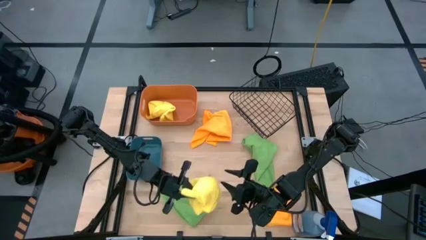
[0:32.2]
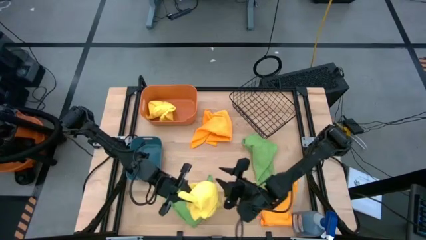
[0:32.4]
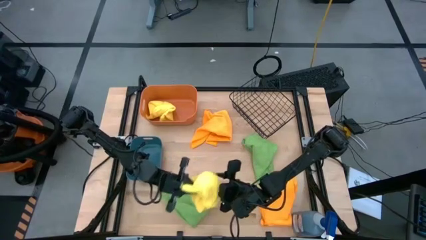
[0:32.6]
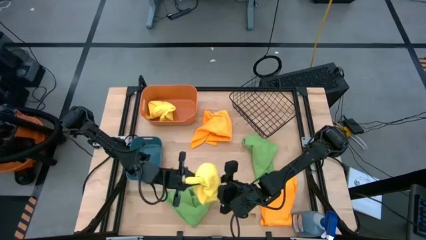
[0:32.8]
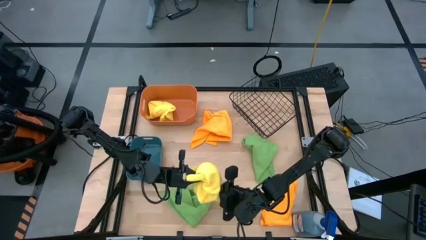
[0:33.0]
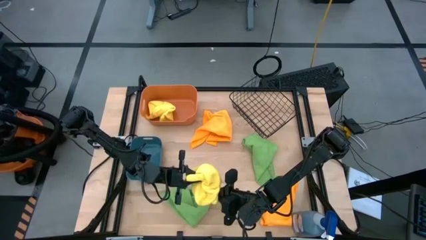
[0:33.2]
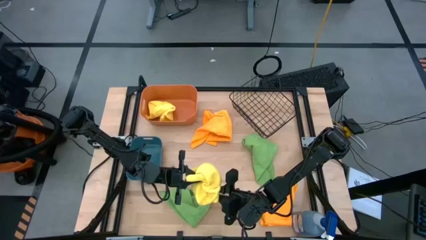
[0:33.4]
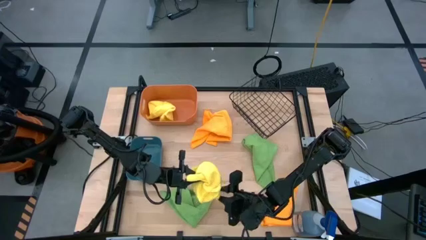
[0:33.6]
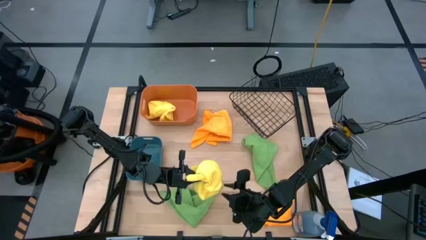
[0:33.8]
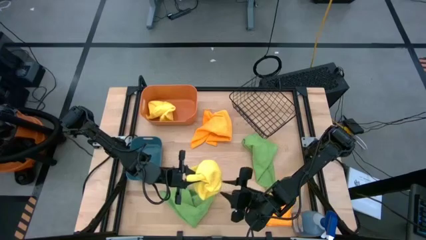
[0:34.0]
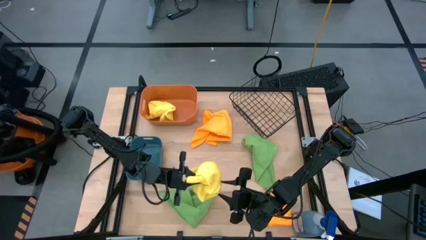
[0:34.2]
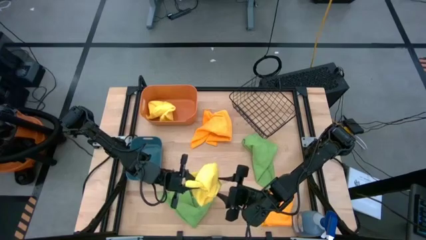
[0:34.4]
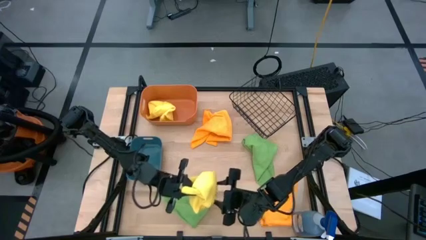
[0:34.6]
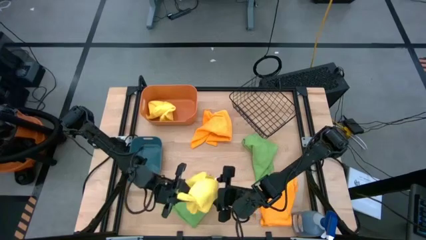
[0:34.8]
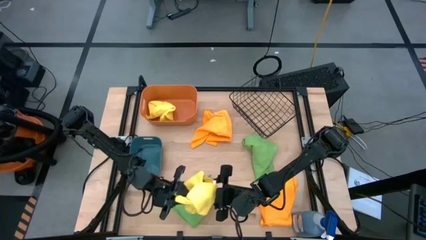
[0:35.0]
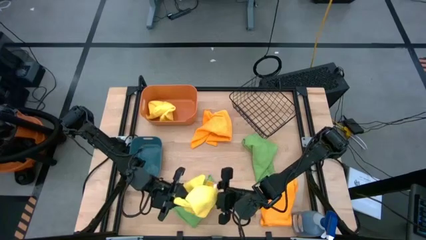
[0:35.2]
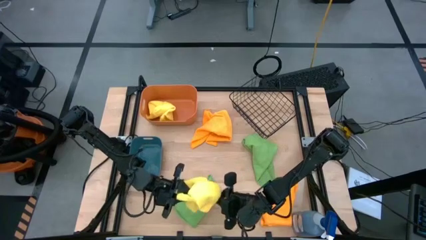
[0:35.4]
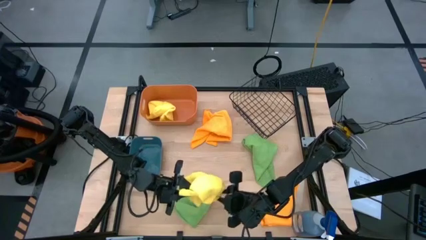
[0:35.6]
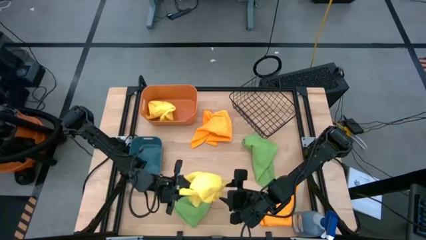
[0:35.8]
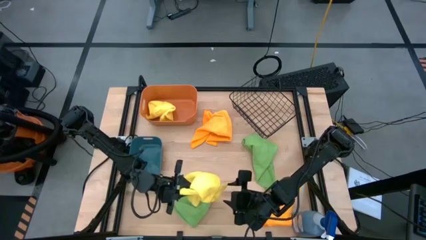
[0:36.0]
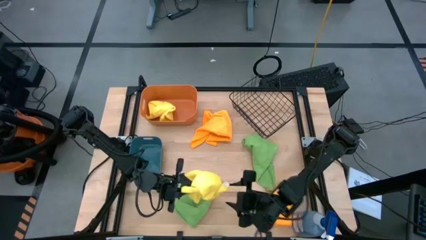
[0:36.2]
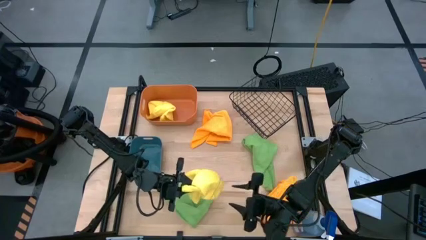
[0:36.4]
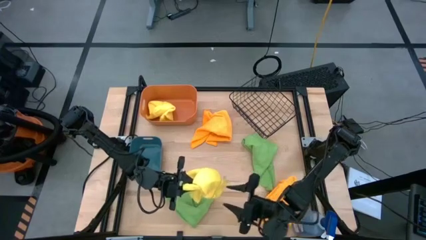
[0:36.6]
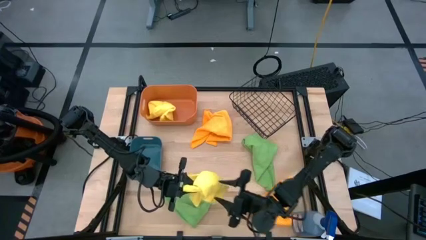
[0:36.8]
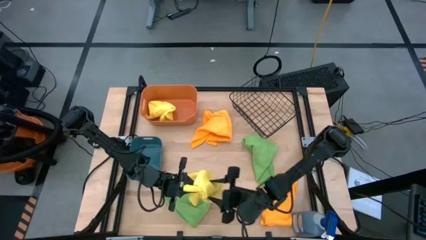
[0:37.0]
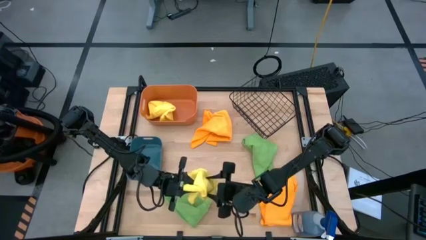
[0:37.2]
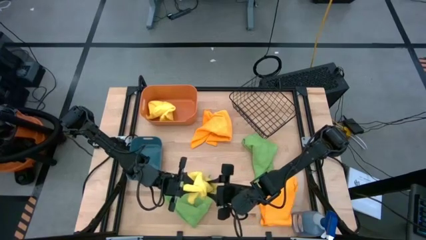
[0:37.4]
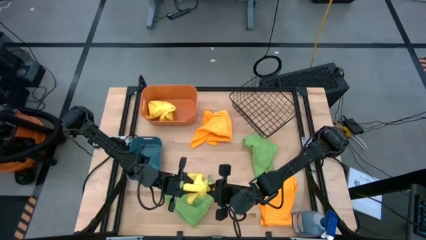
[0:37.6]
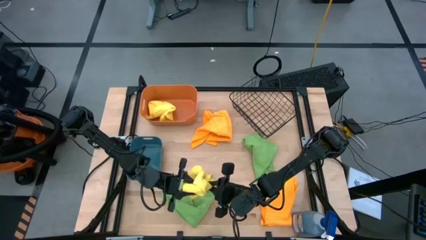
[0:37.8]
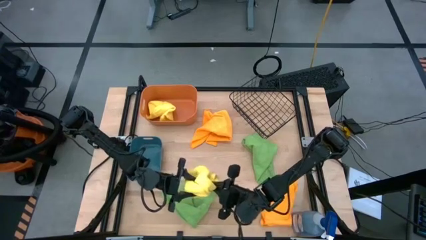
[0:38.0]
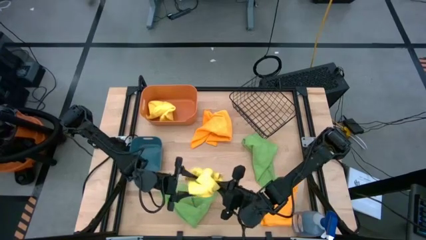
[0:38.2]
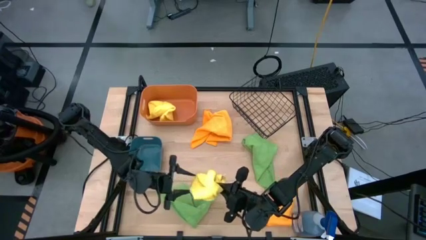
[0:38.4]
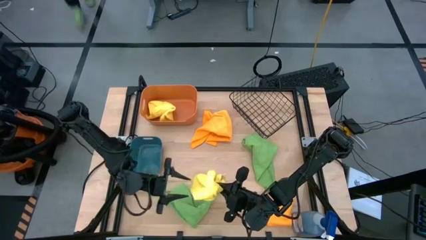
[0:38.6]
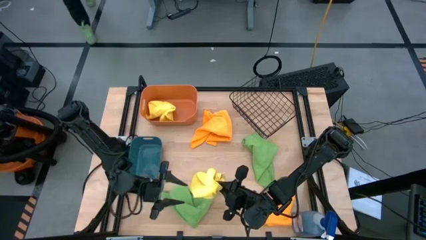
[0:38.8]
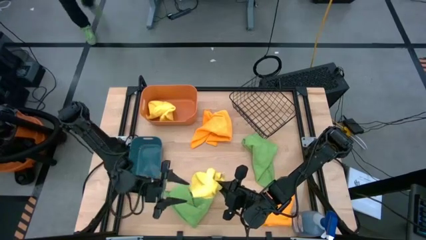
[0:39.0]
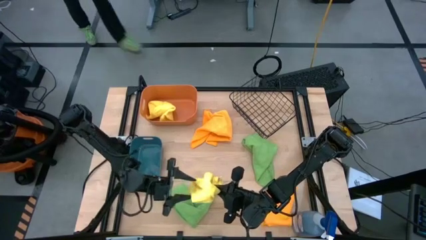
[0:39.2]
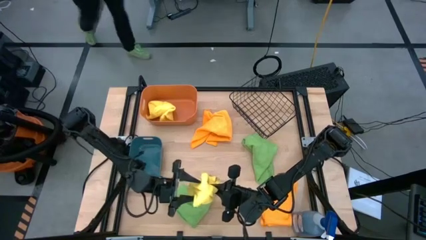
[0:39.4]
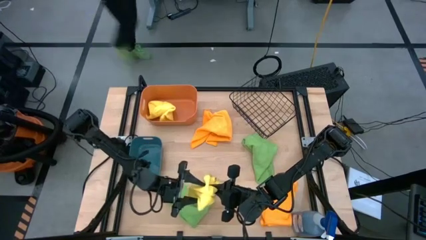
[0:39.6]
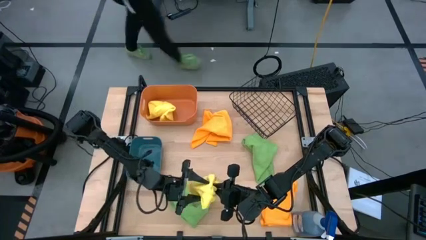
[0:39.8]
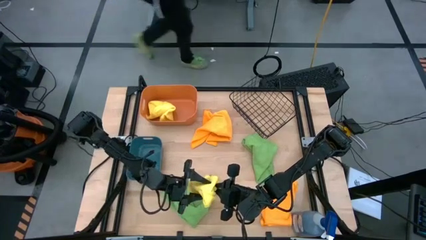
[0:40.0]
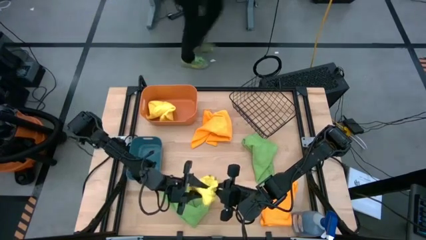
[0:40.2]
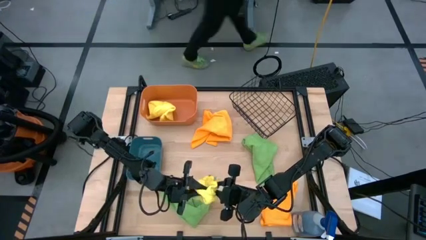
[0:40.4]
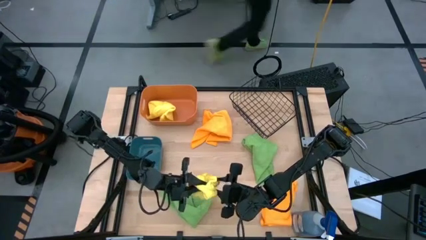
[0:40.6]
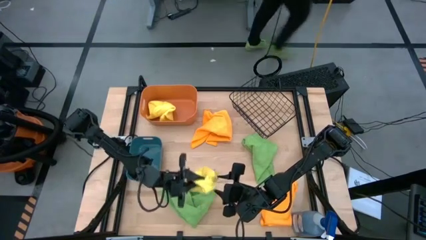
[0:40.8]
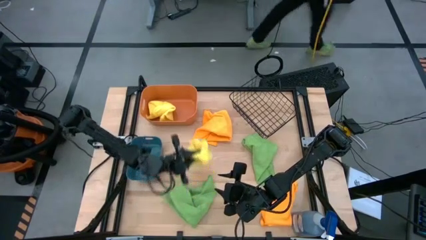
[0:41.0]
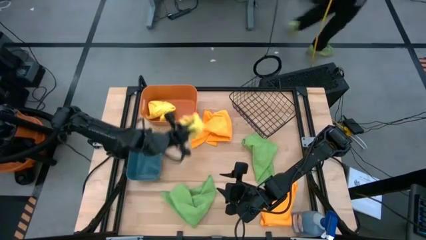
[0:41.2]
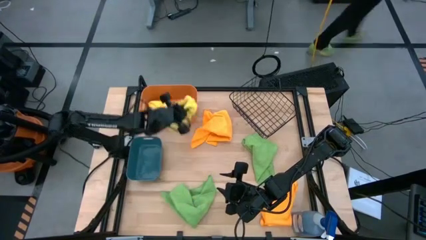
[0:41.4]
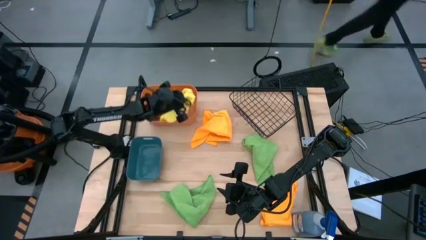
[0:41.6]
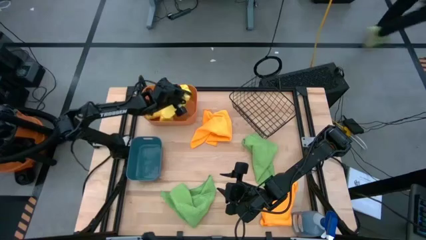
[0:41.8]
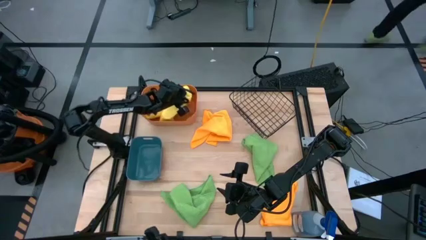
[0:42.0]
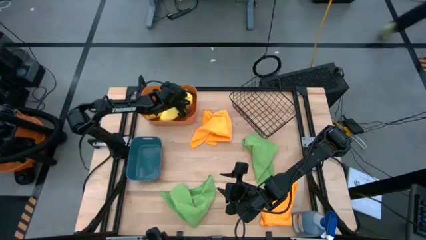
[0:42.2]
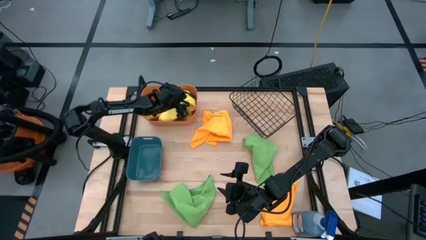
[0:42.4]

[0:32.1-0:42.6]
Task: Sort microfiber towel by color & place in baskets
Put the yellow microfiber towel into the orange bin
